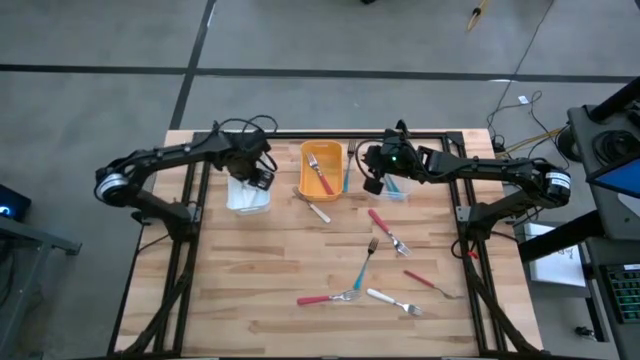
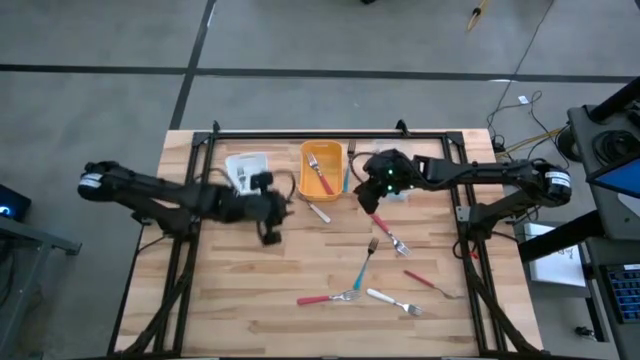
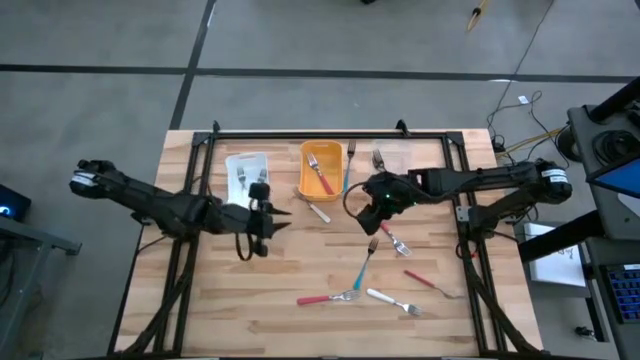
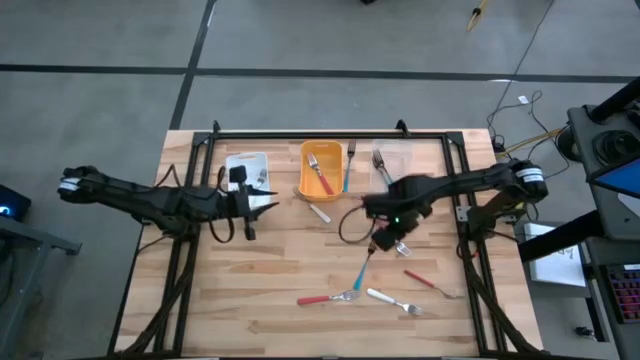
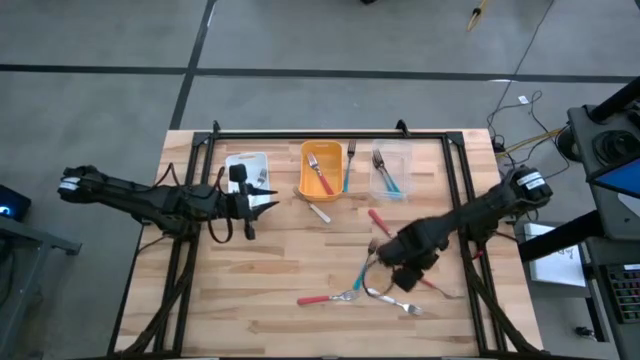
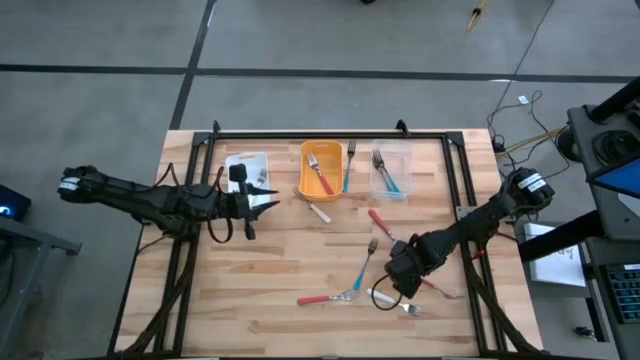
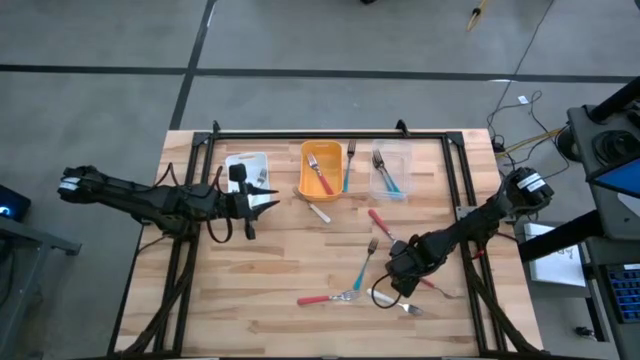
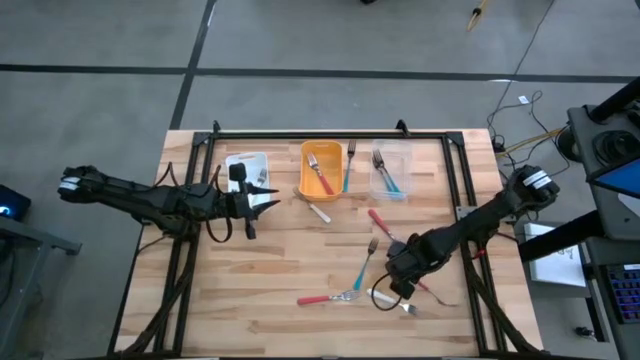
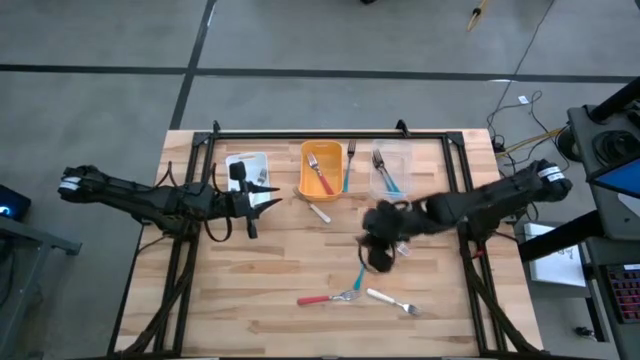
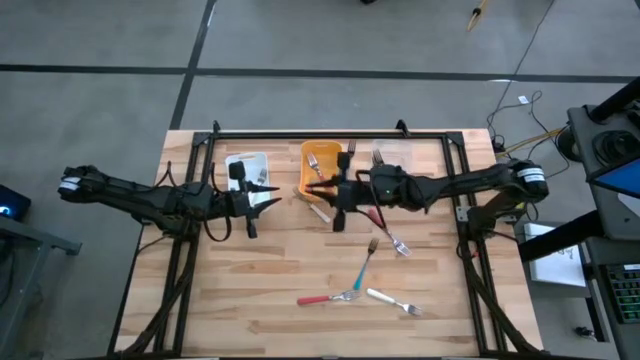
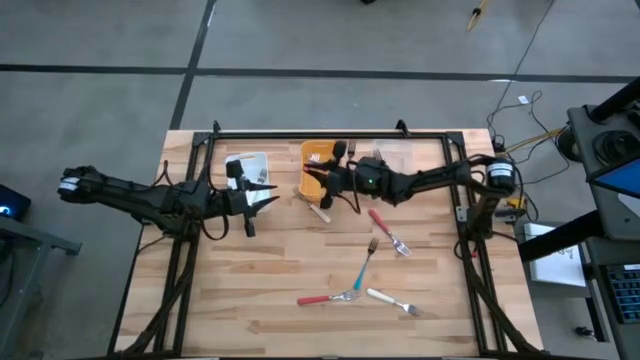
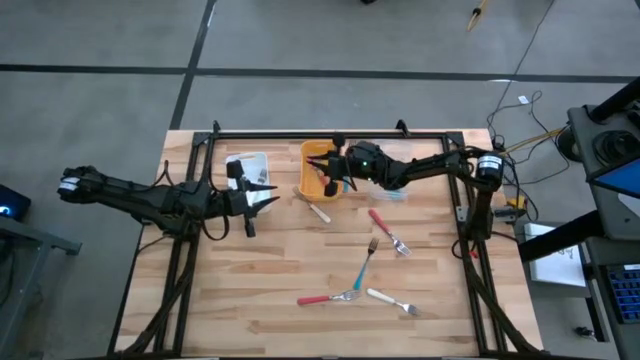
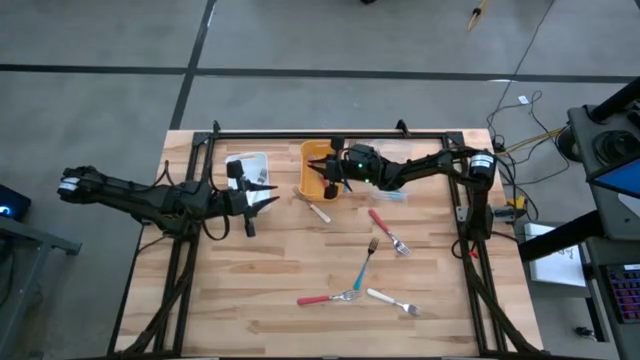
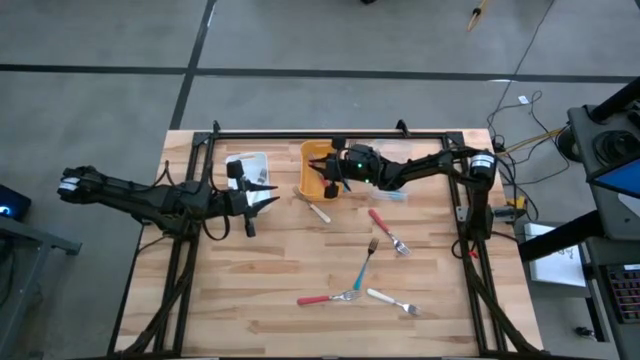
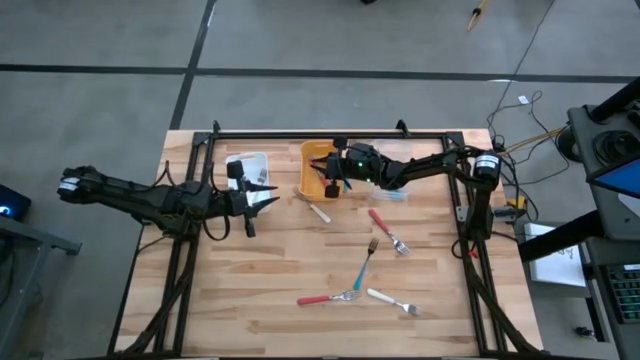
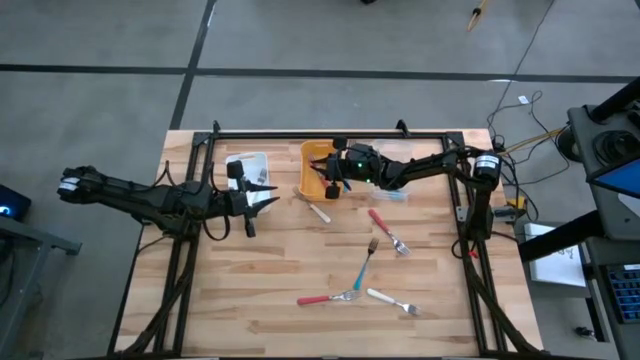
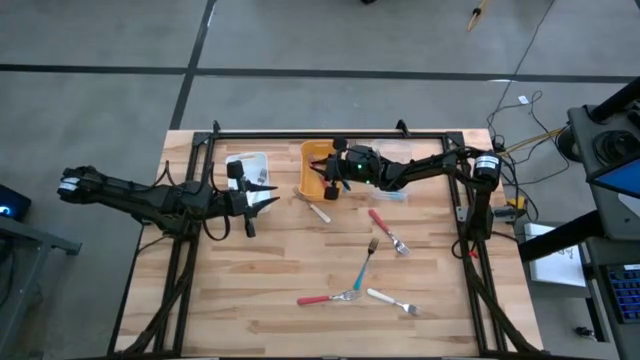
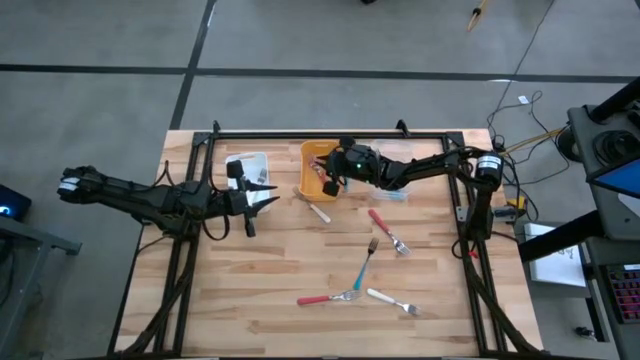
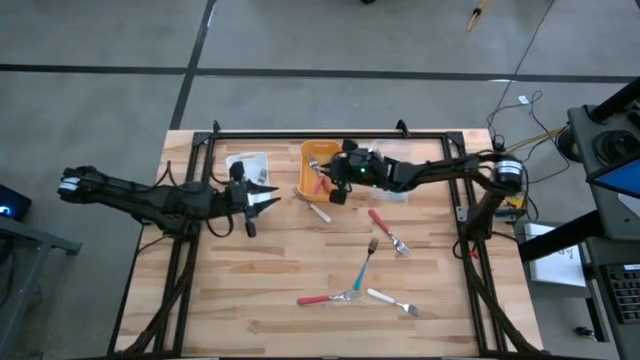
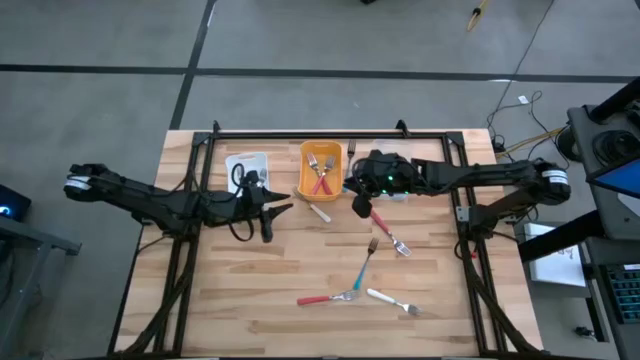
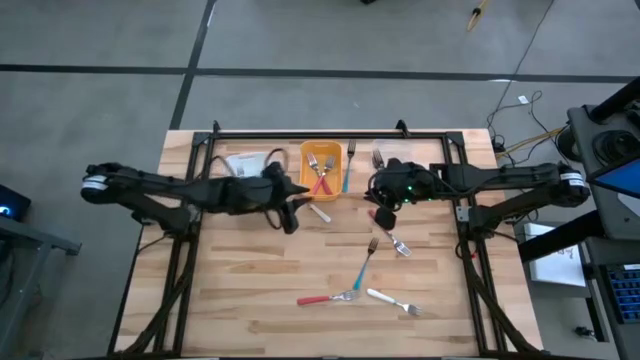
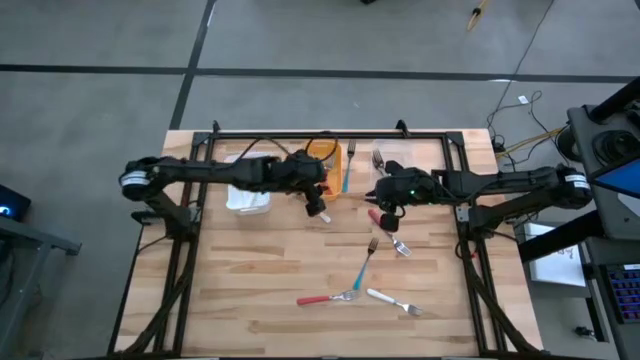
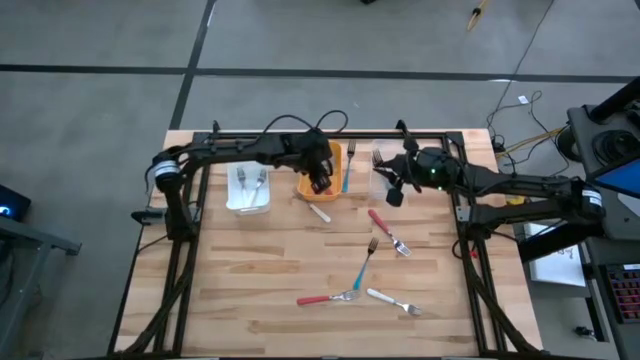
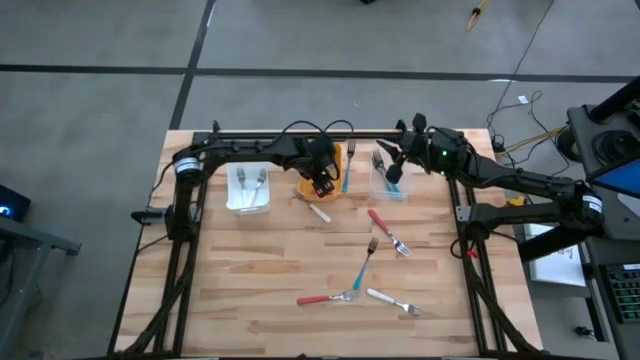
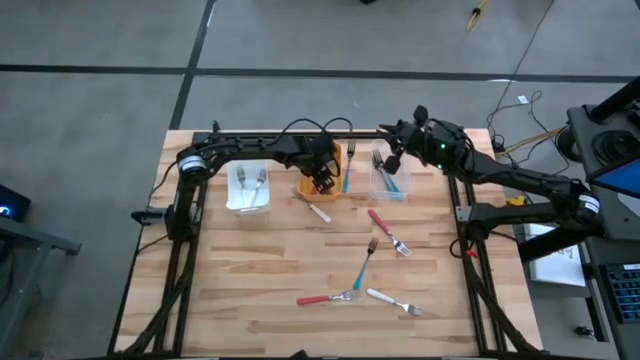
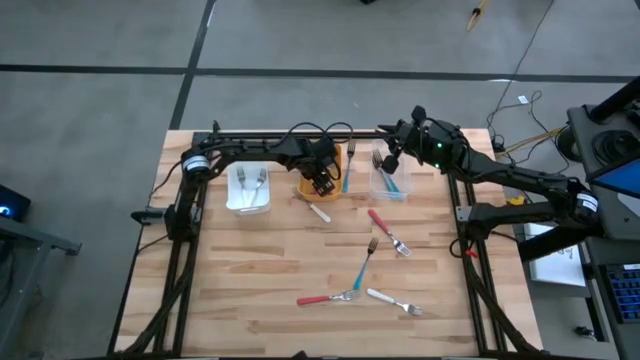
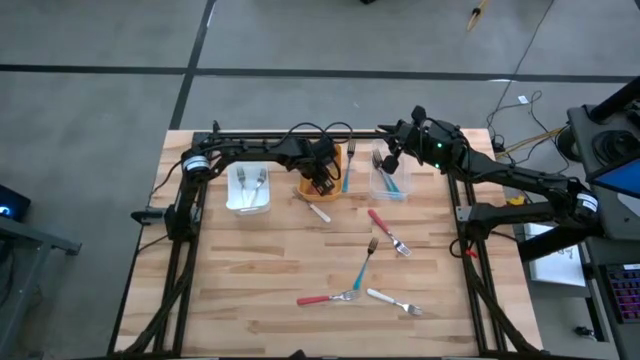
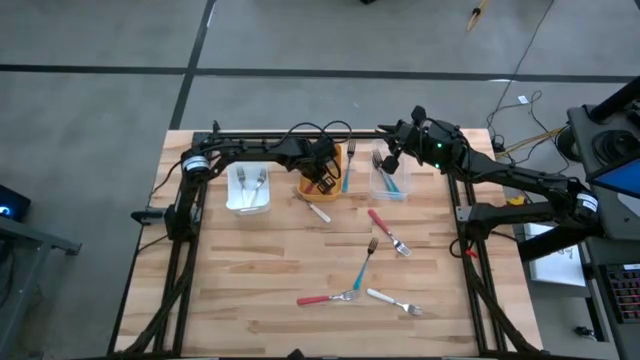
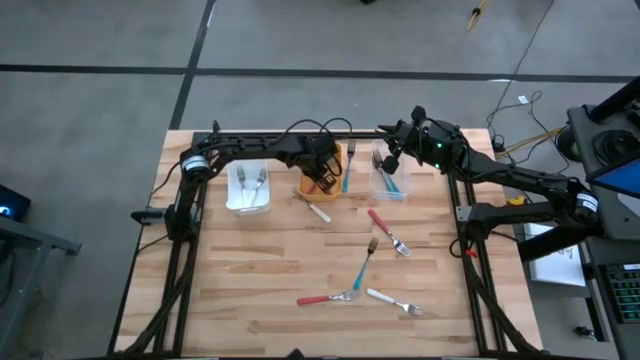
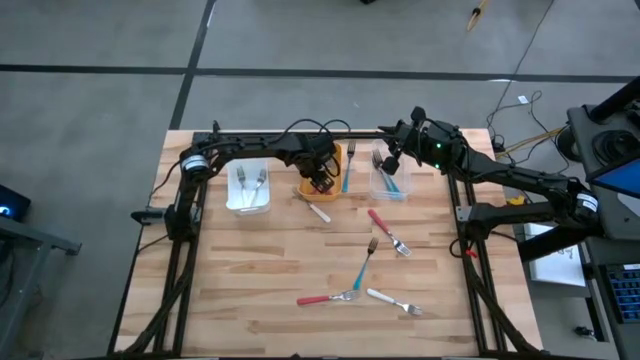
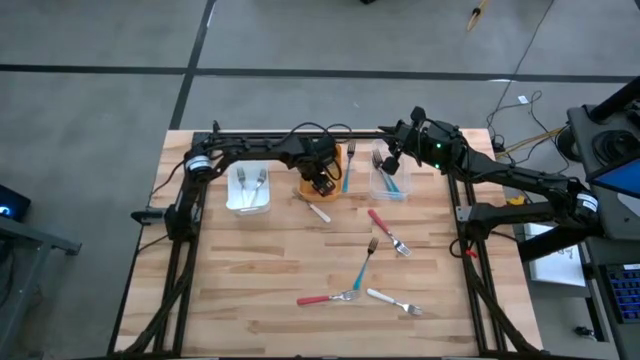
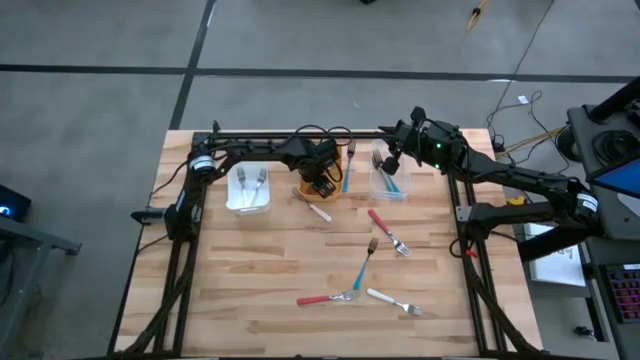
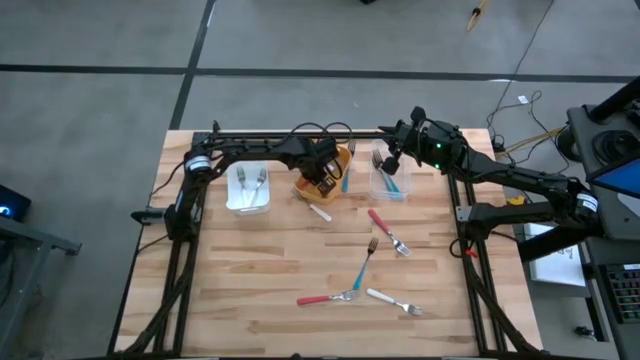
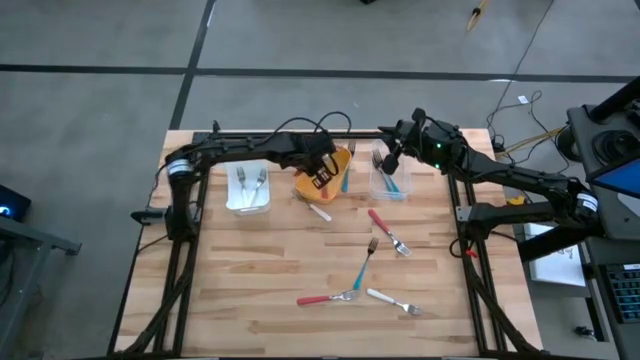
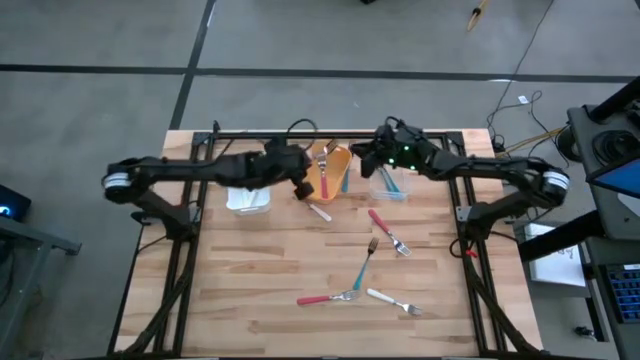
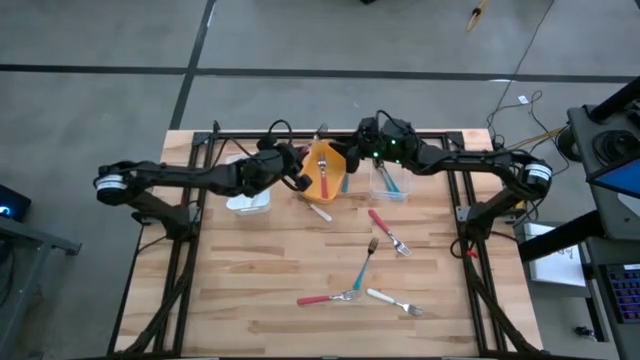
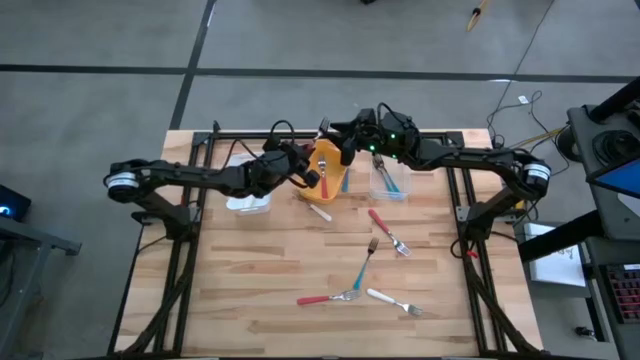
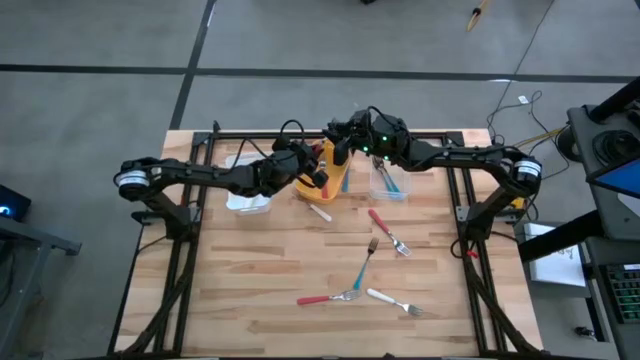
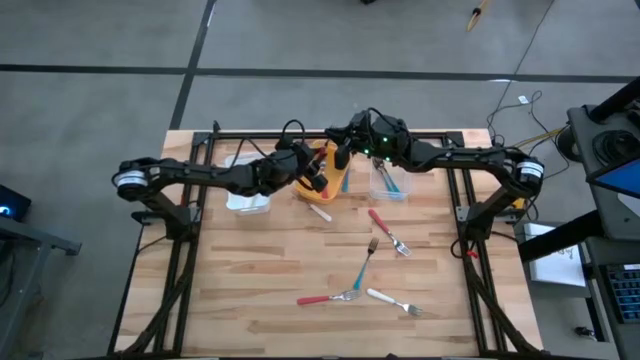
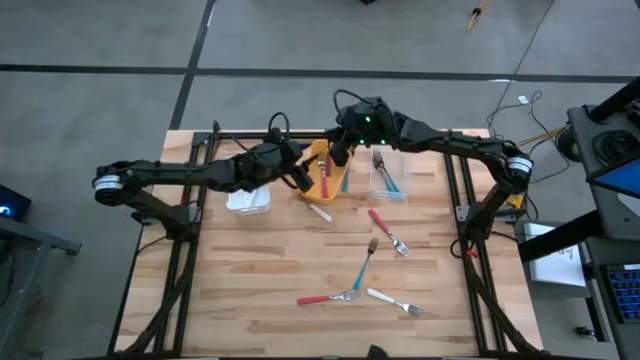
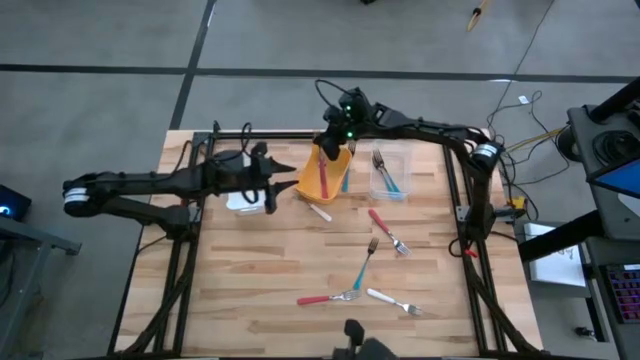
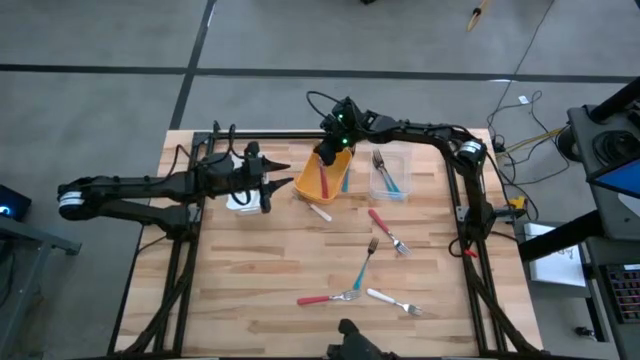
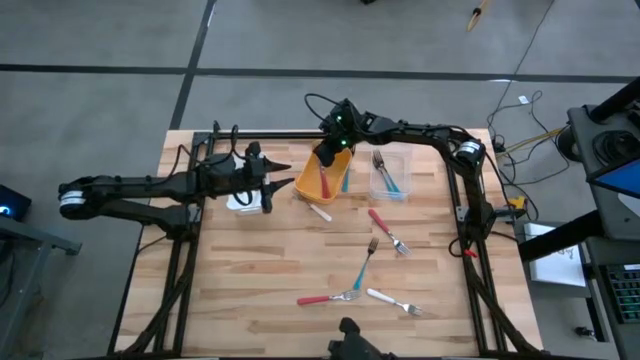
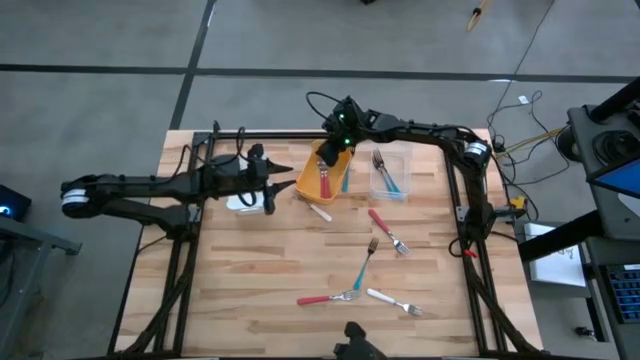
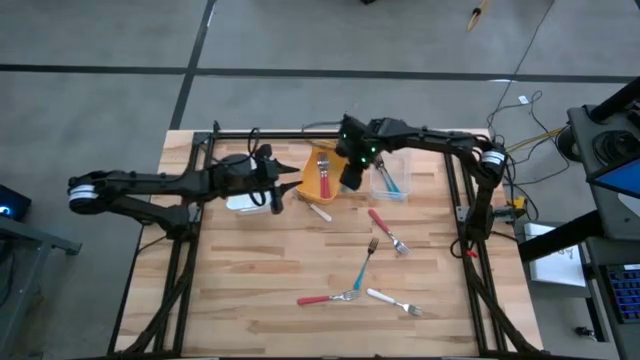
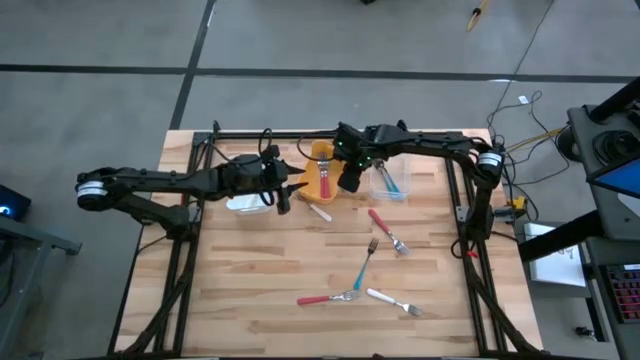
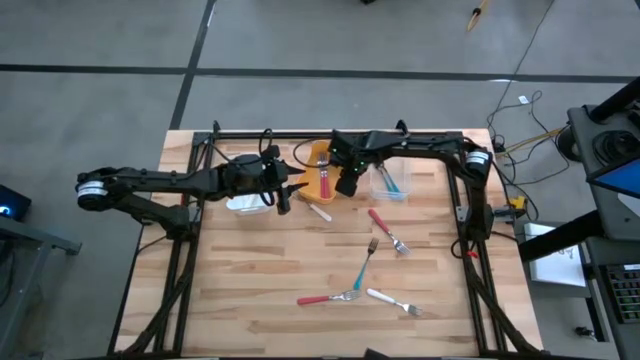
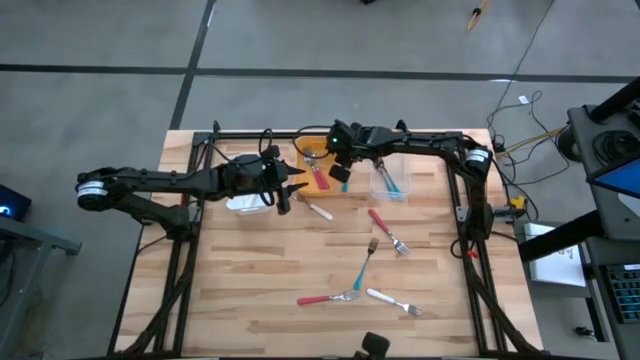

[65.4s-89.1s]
Task: Sort silverware by color (type)
Put the pink fork into the yellow bin
